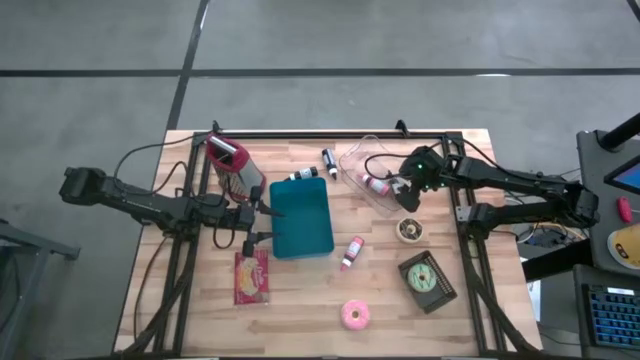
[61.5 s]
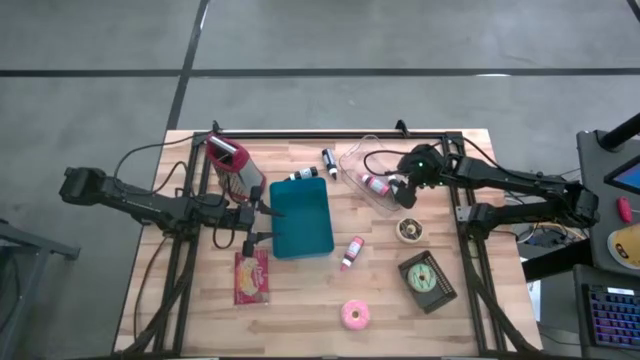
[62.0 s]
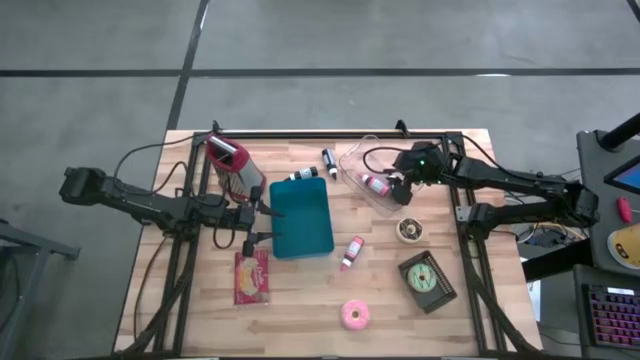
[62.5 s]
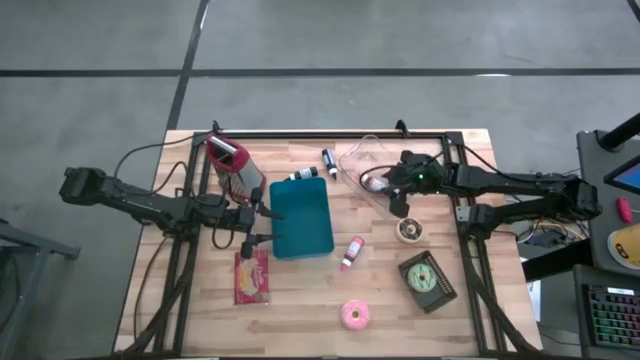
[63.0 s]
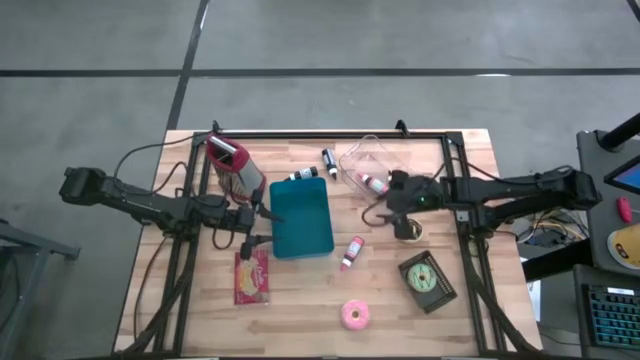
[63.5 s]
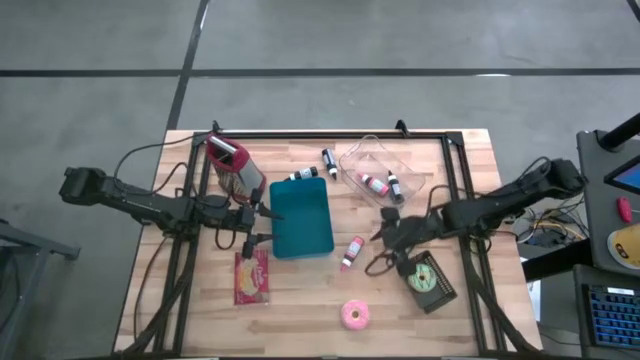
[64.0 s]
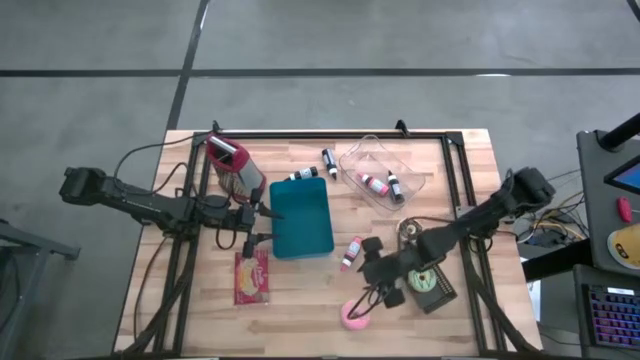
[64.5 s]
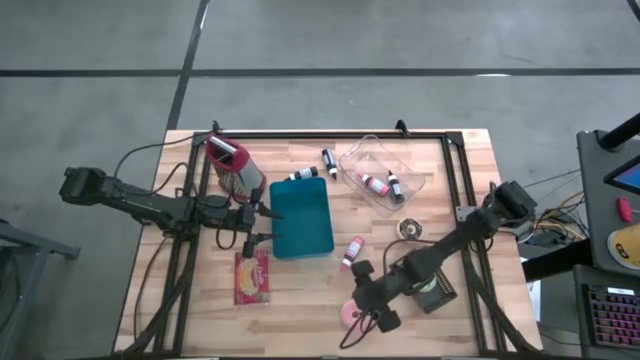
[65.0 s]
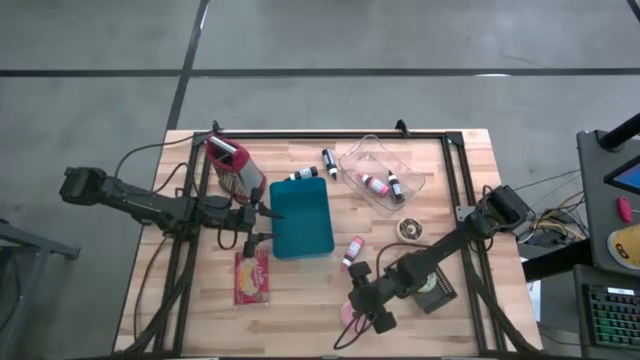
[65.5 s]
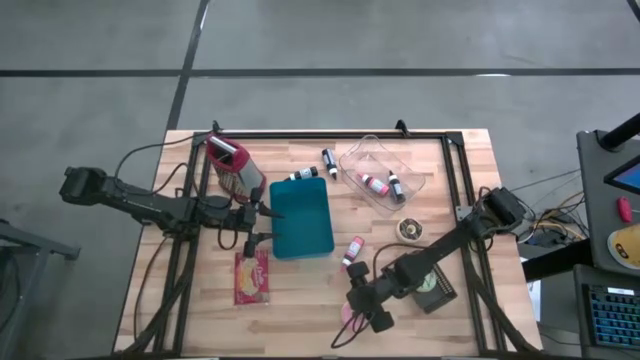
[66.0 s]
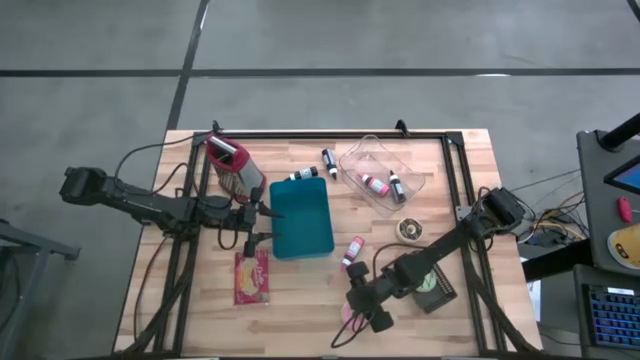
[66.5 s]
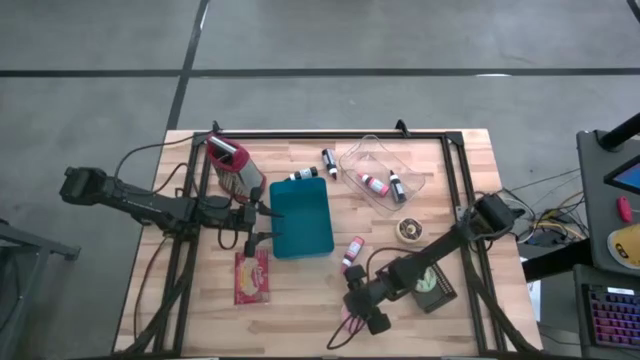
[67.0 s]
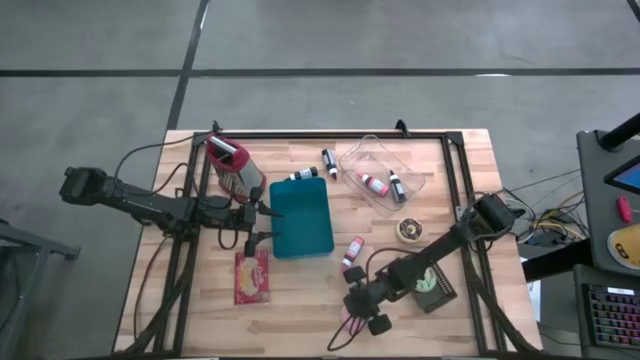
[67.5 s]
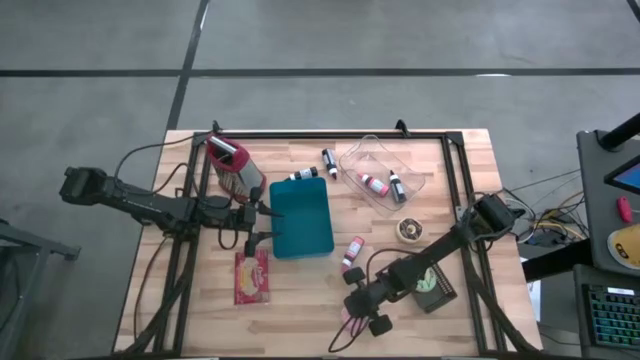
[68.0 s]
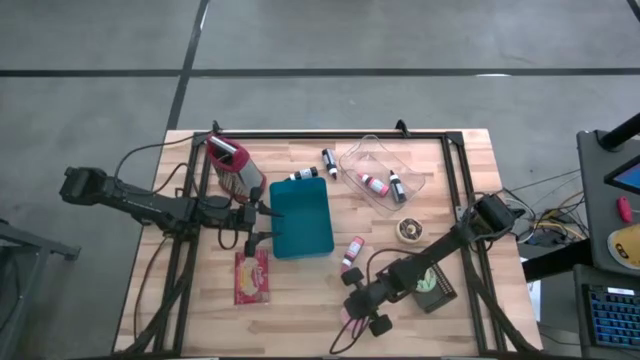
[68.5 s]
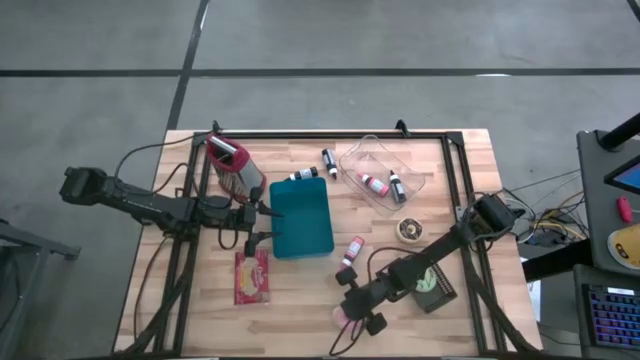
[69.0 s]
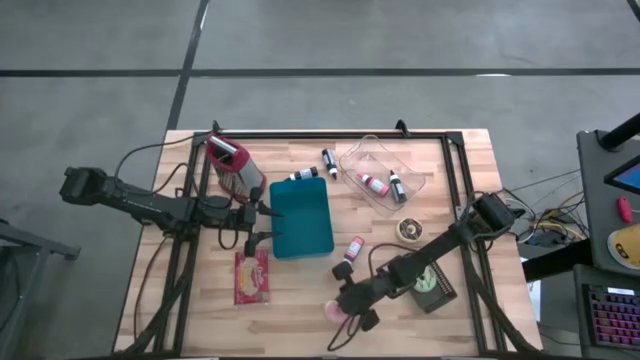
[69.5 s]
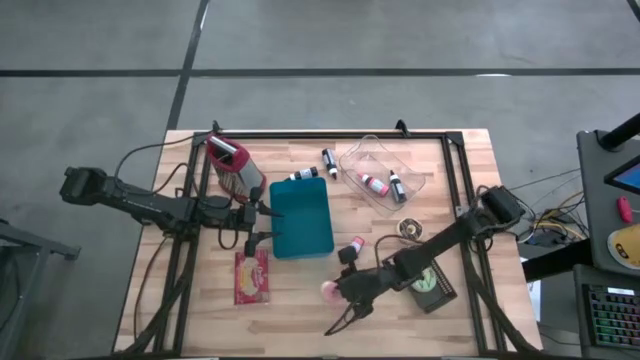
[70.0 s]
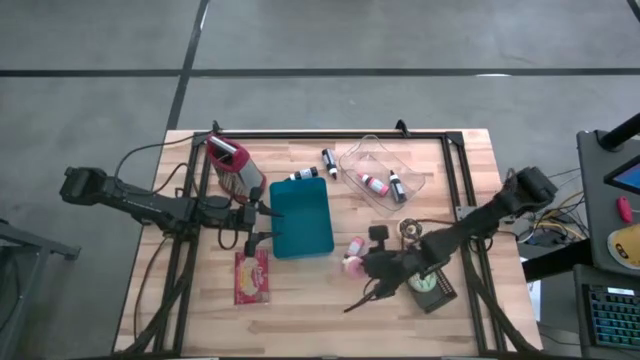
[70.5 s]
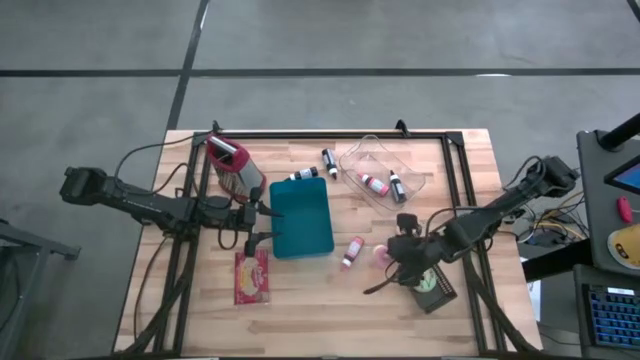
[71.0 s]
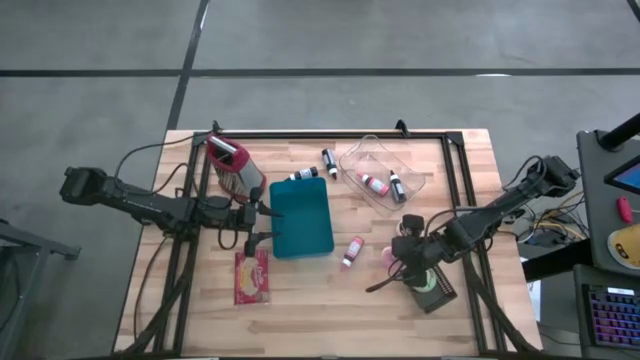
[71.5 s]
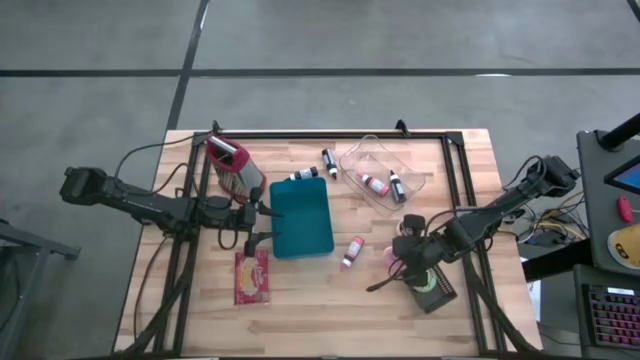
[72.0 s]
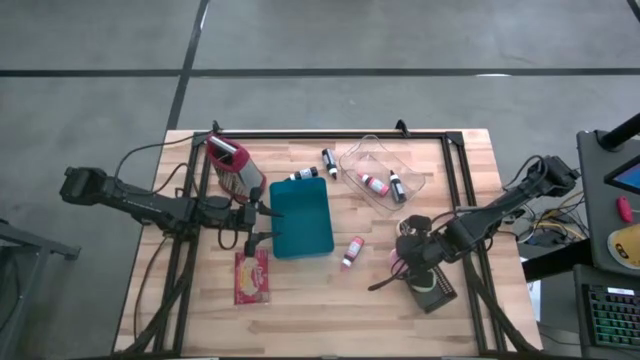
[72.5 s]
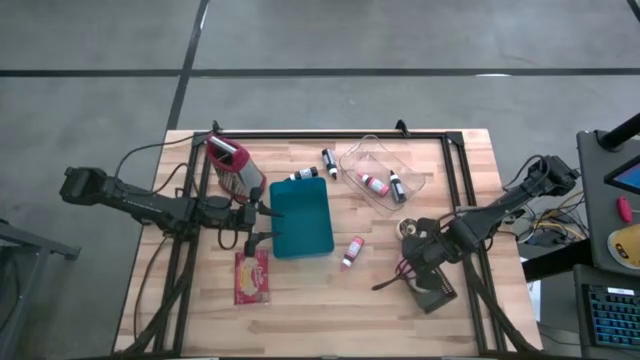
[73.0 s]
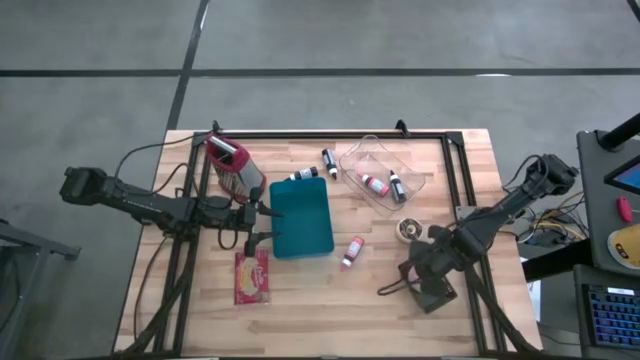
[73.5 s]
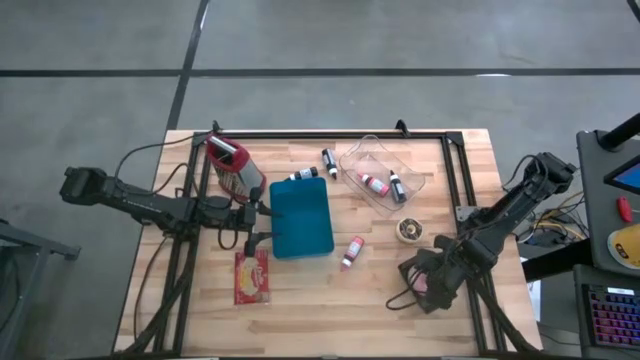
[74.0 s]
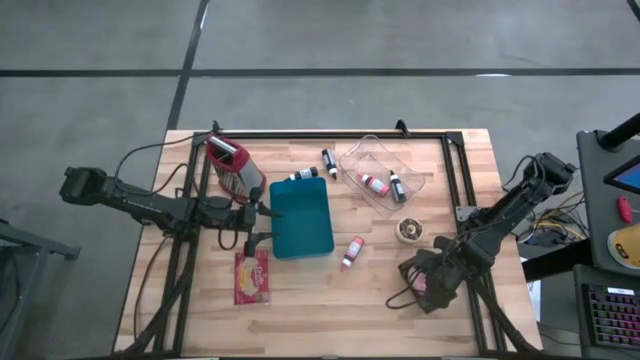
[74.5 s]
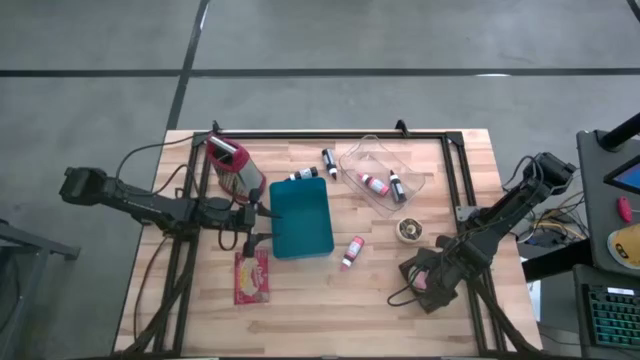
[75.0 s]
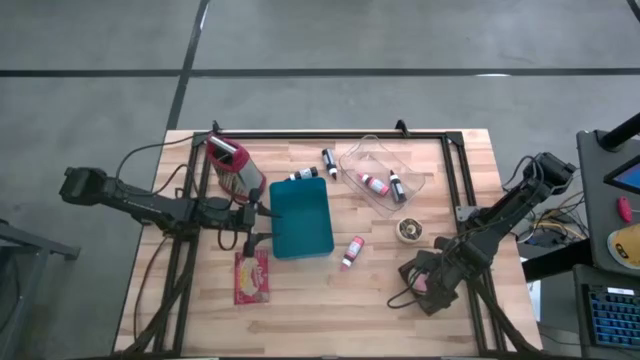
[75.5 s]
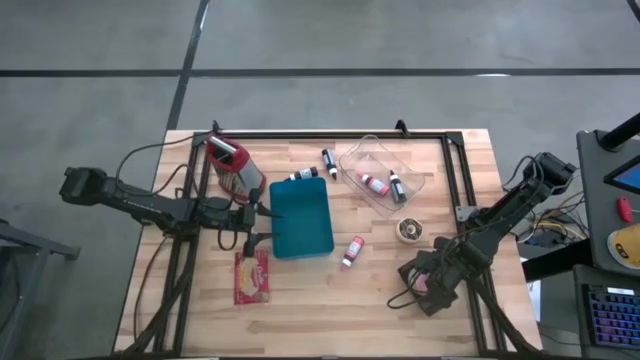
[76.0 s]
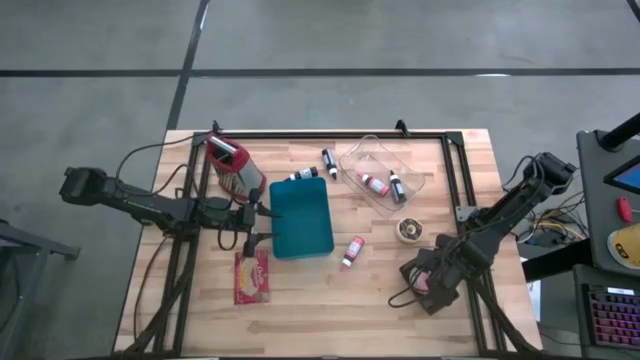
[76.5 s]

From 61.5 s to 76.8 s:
Task: Pick & Place Food Item
Put the pink donut into the black bin

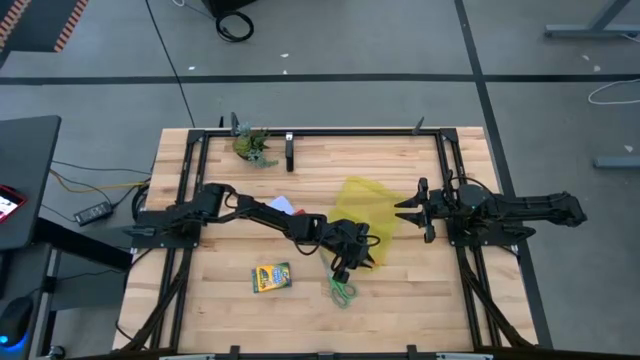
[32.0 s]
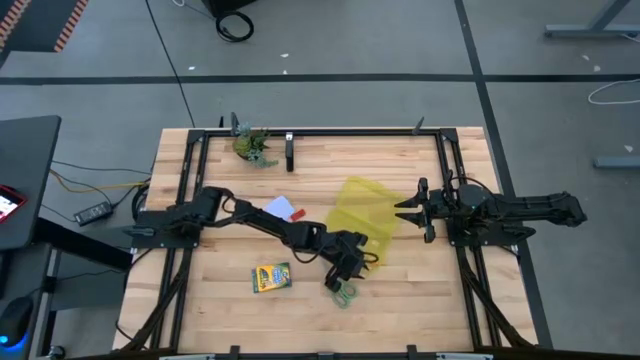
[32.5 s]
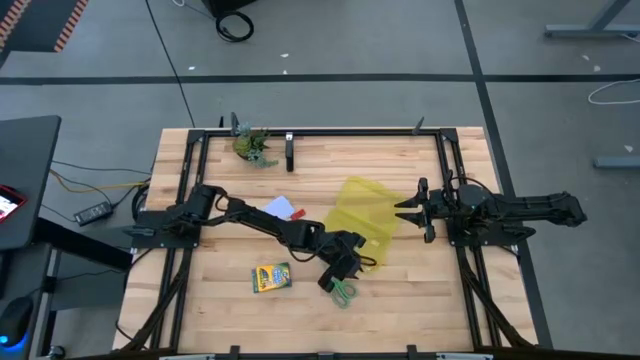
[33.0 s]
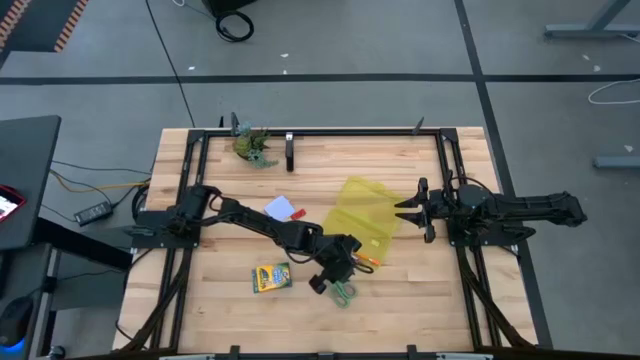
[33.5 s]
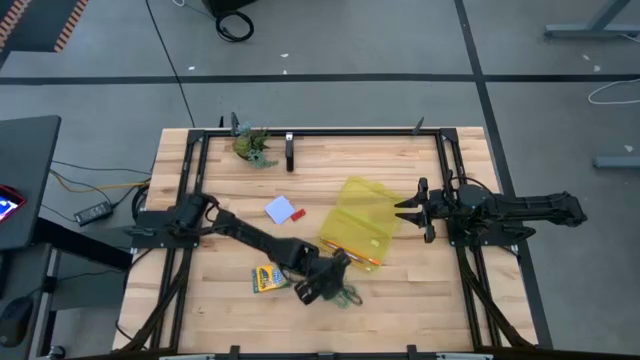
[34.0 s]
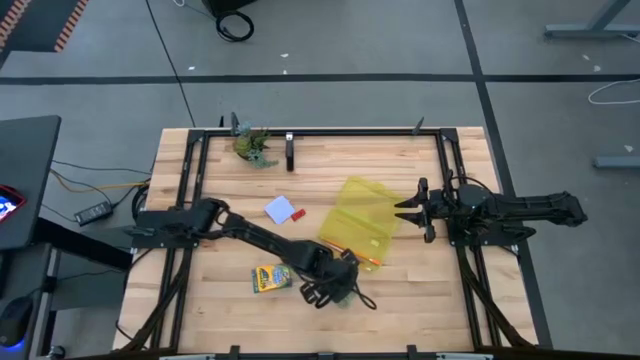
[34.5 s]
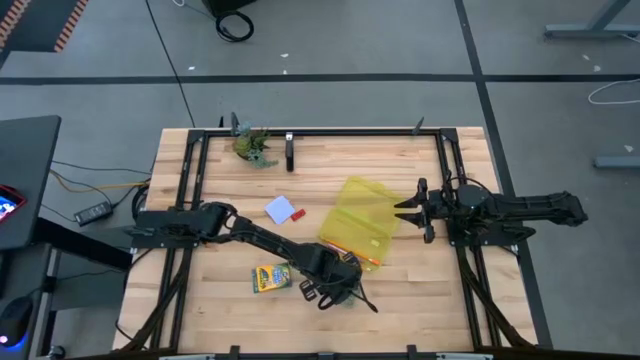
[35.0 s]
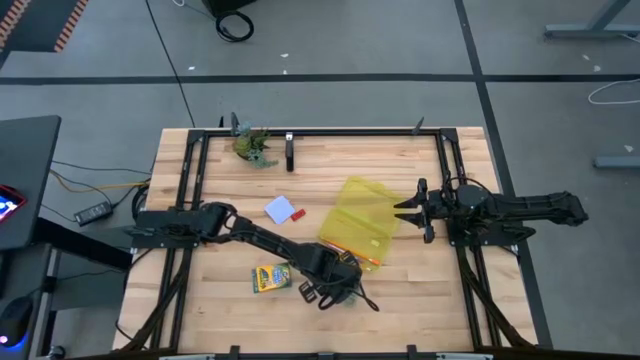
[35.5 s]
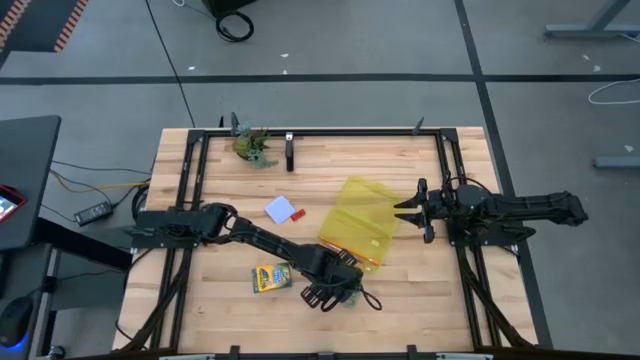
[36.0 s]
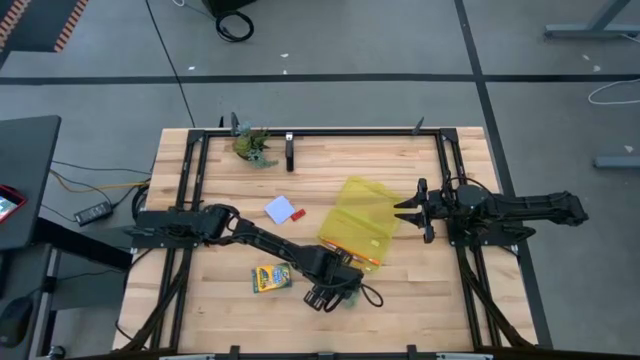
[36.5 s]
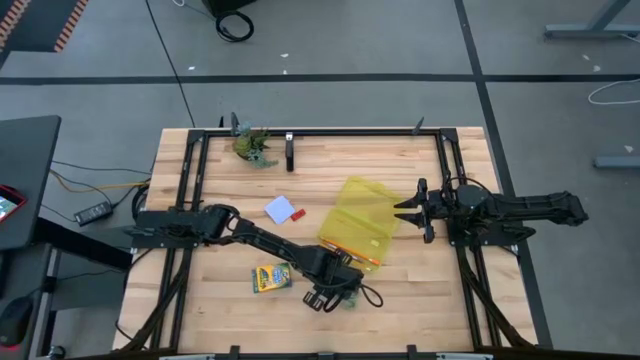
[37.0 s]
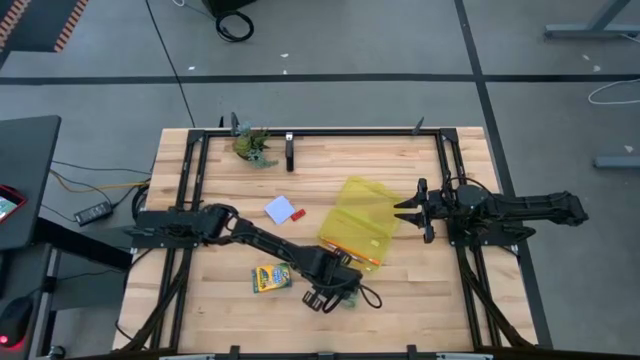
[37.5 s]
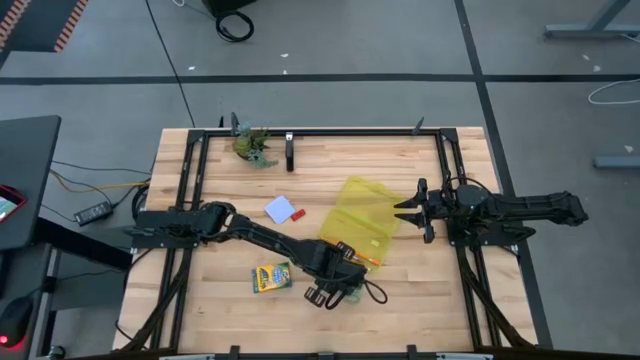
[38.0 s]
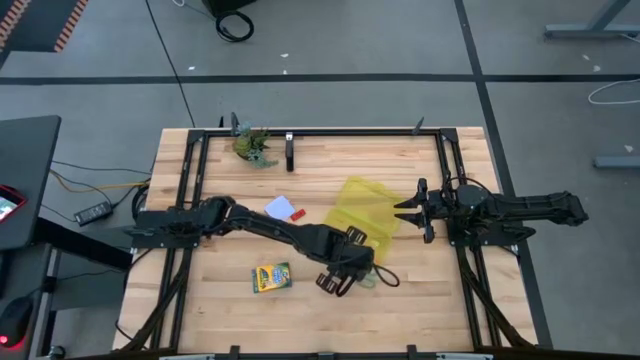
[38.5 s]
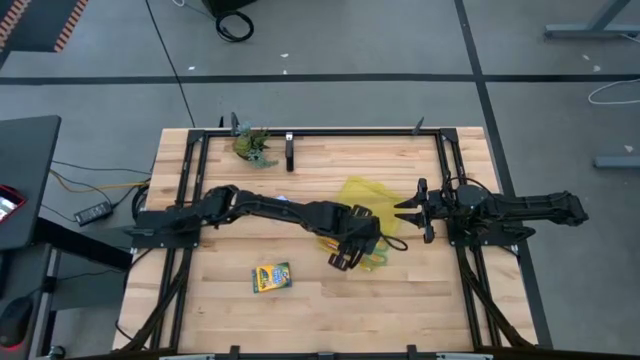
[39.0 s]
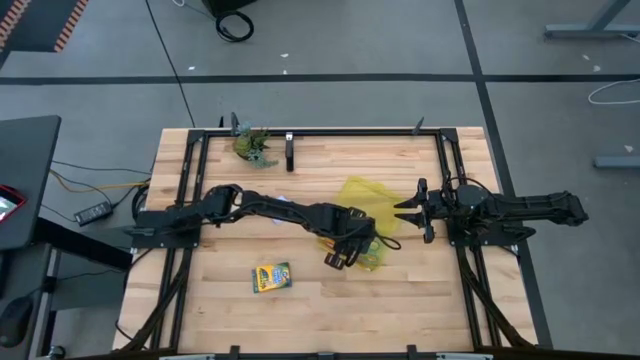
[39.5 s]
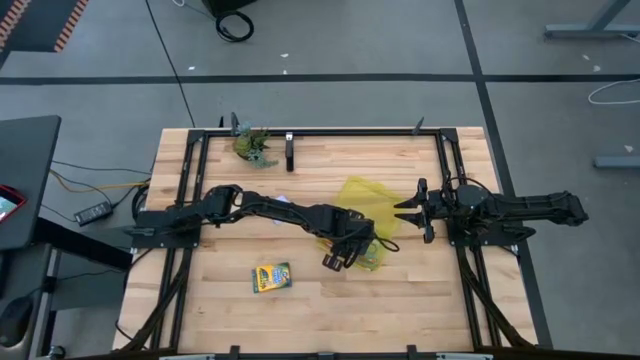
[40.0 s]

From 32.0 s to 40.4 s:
Task: Pack school essentials
Put the green scissors into the yellow supply box
